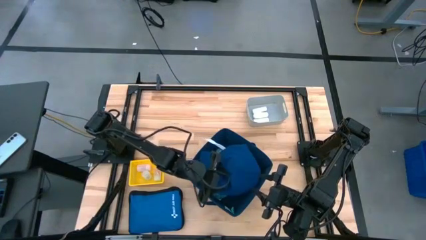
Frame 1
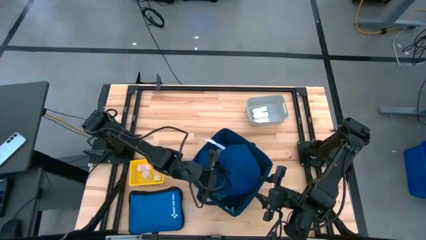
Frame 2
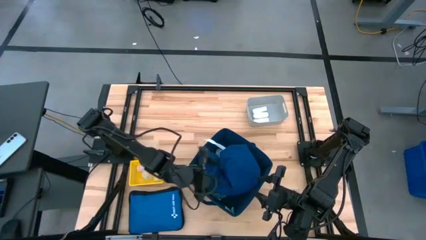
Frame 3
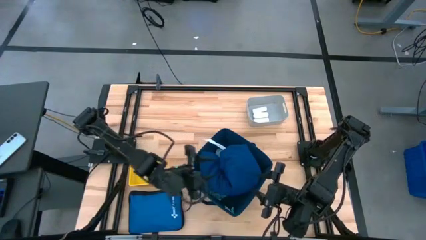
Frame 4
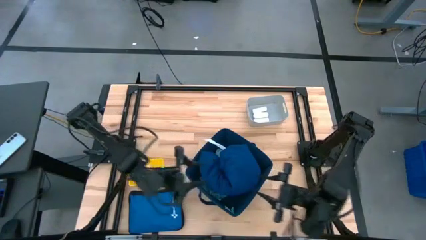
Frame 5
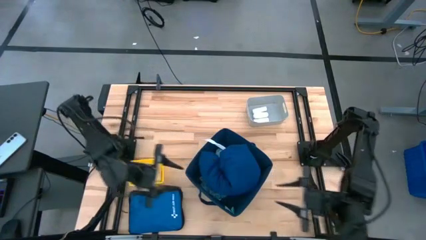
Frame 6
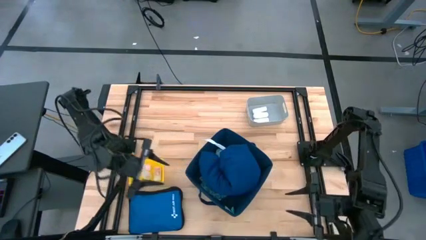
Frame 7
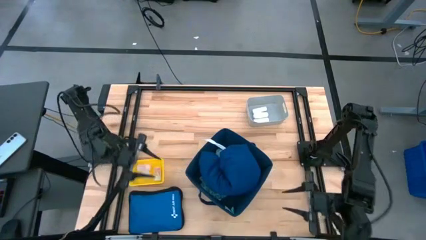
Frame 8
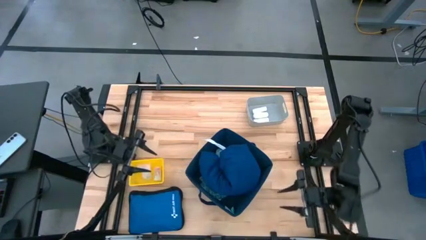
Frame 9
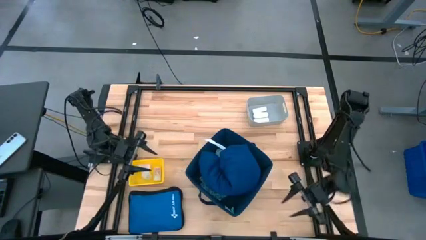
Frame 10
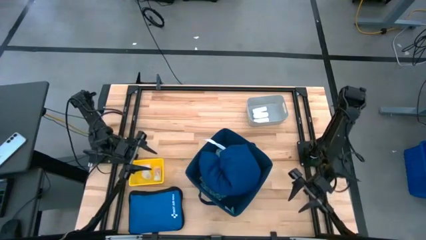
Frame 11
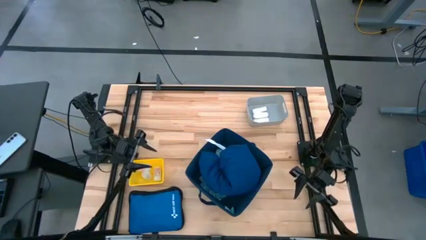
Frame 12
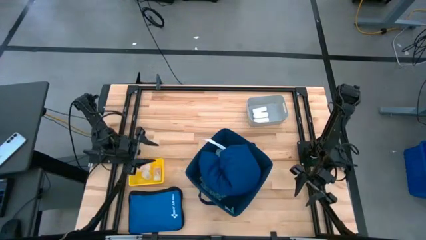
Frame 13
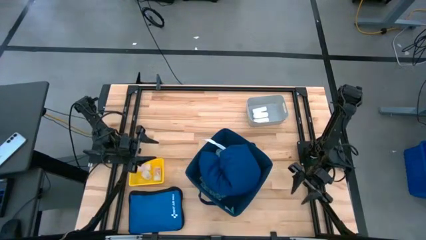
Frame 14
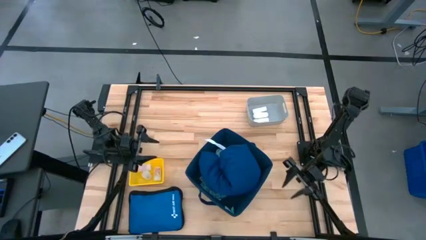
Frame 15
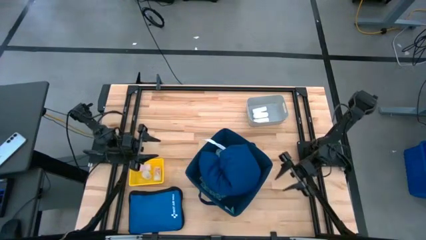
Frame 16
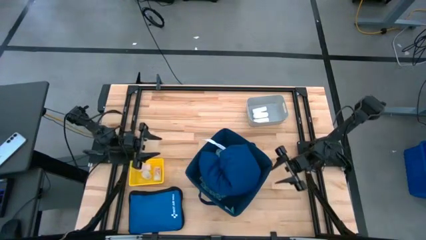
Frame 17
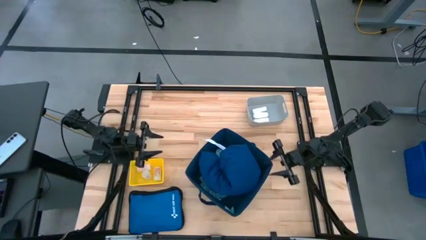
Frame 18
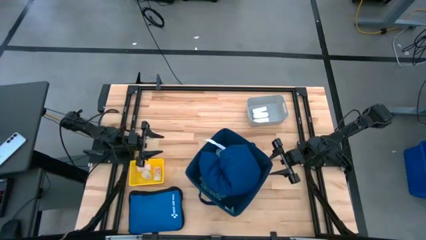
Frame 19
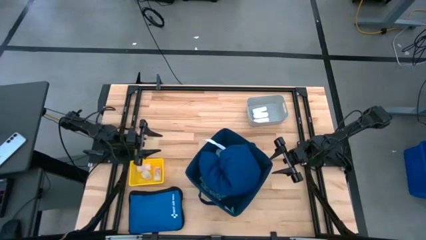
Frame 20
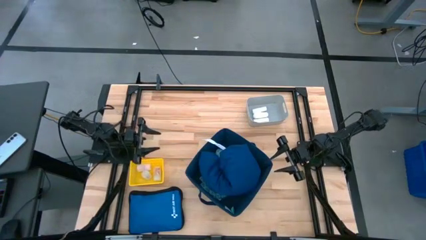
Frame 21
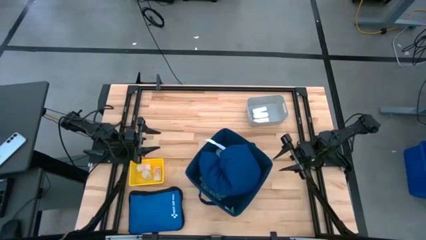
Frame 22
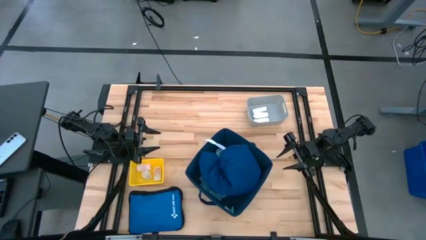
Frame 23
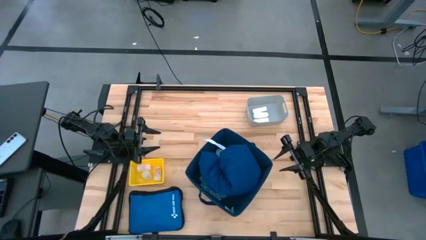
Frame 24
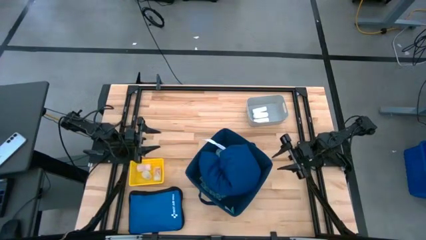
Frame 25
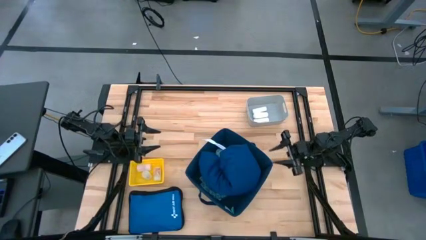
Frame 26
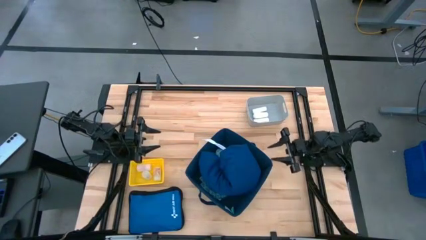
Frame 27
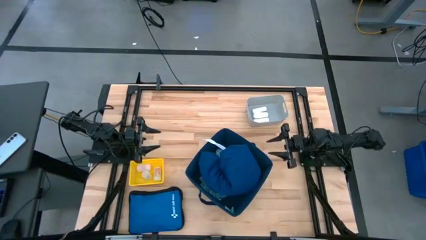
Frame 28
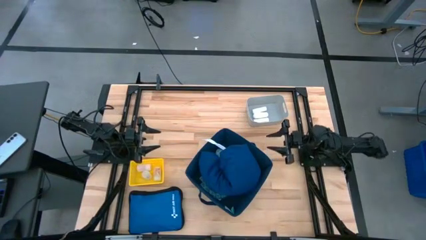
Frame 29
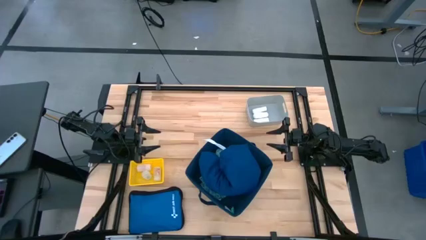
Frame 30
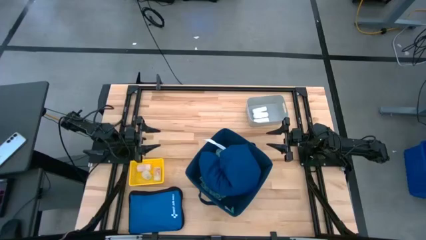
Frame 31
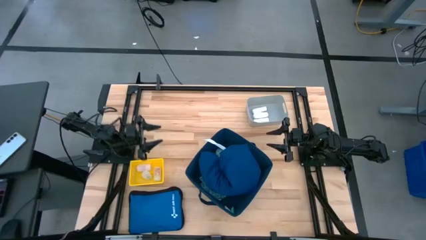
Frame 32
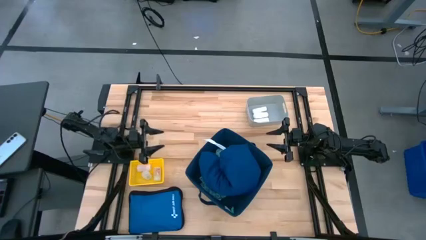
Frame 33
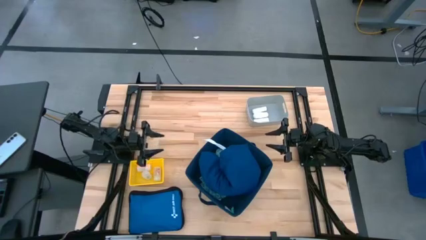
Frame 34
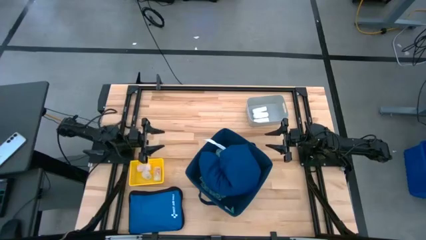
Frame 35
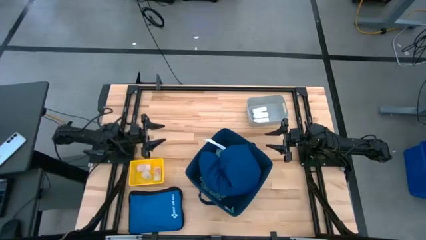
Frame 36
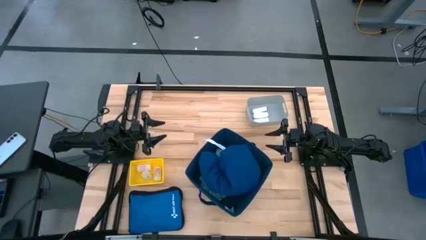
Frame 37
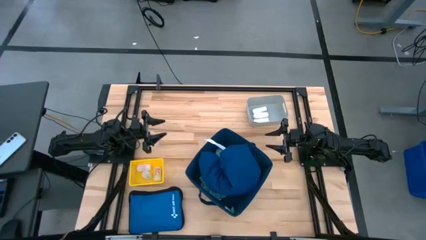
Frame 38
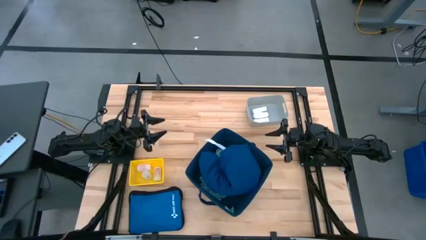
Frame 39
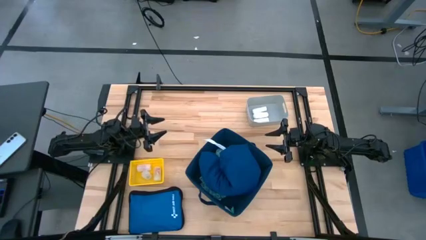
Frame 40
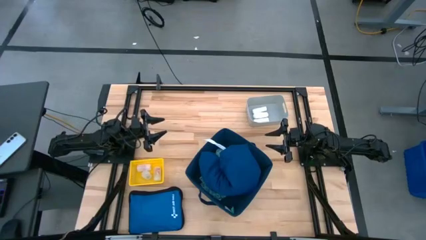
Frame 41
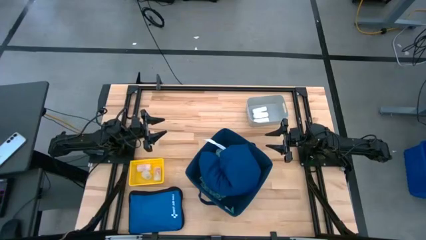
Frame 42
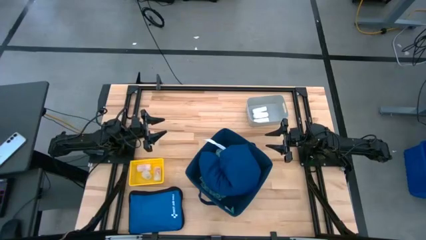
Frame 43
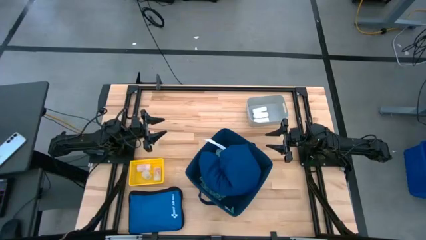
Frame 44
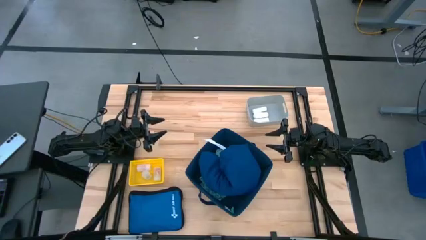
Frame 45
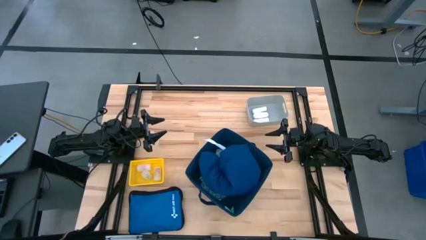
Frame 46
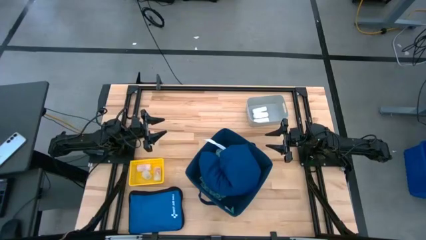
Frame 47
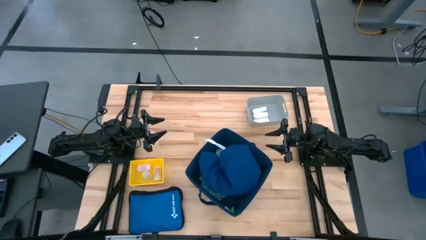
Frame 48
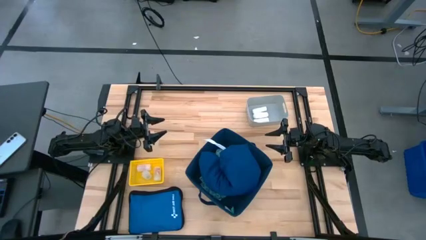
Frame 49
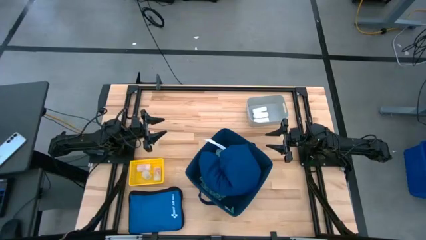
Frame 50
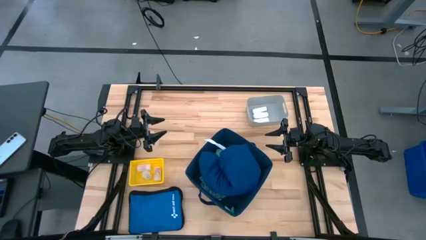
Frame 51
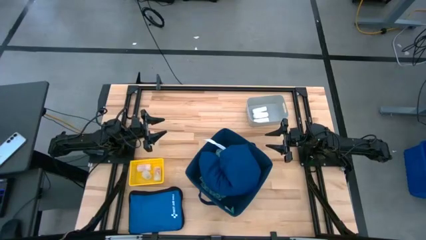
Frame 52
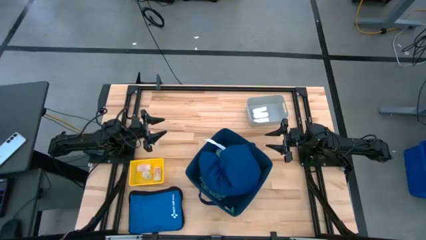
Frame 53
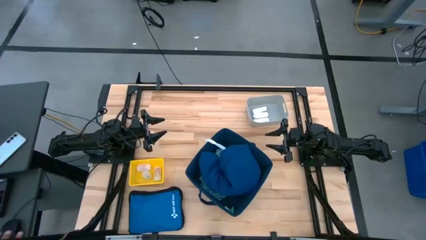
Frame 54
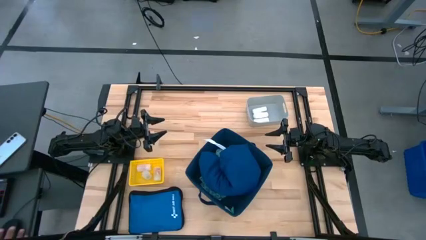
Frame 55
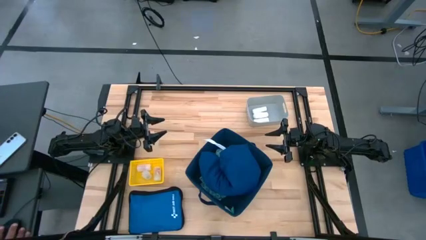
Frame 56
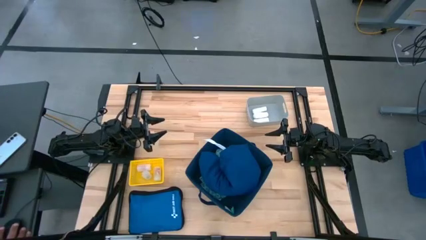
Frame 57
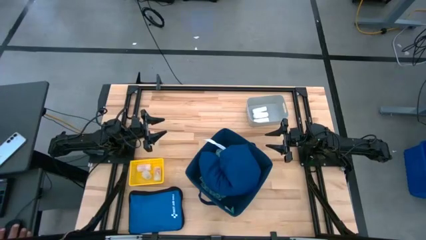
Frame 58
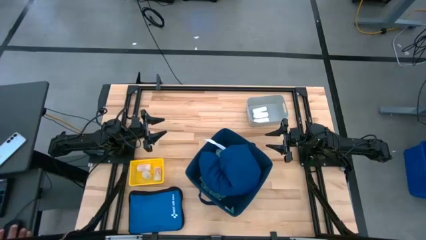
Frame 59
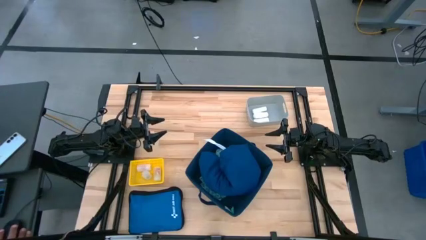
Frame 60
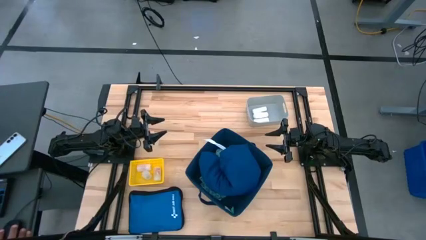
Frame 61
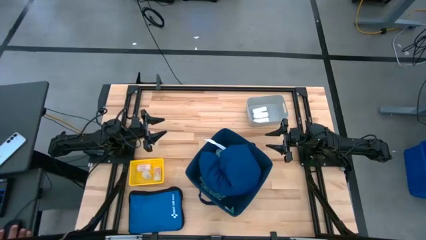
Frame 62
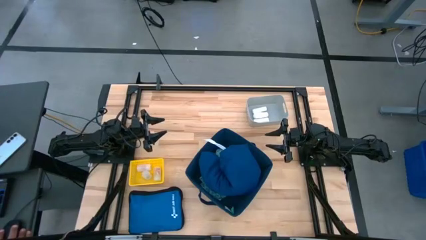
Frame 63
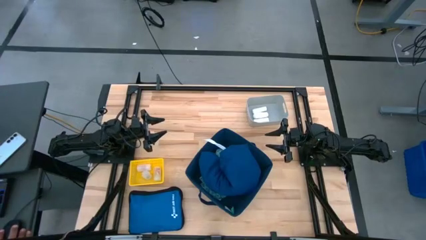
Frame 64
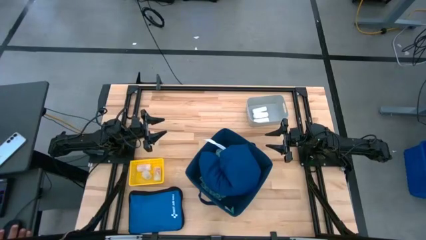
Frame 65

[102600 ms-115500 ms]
Task: Pick & place medical supplies in basket/bin
Return to Home Position

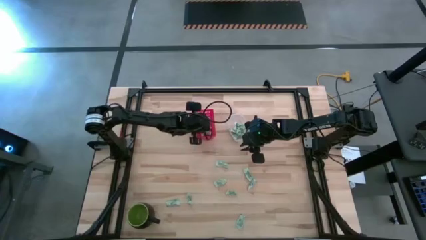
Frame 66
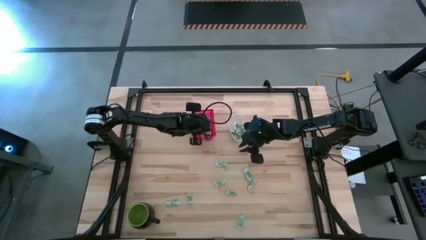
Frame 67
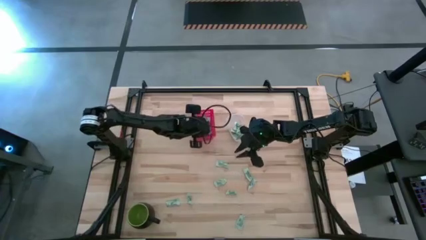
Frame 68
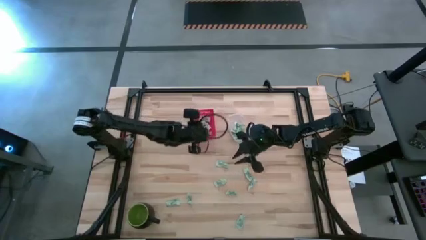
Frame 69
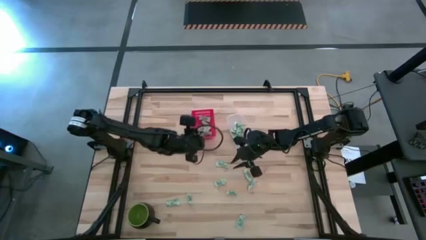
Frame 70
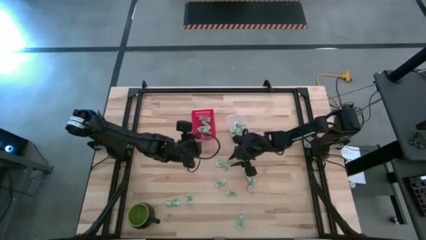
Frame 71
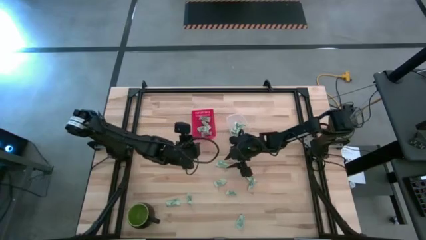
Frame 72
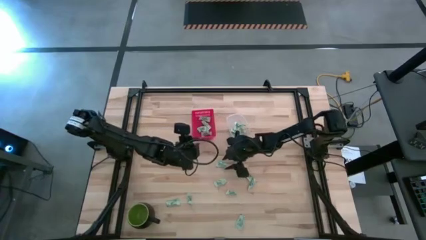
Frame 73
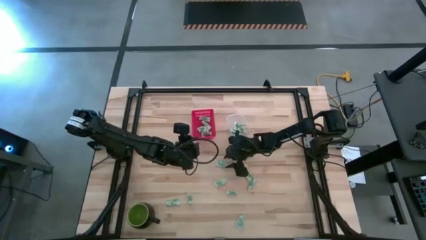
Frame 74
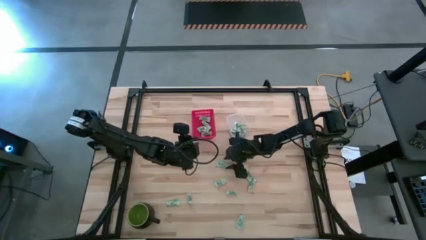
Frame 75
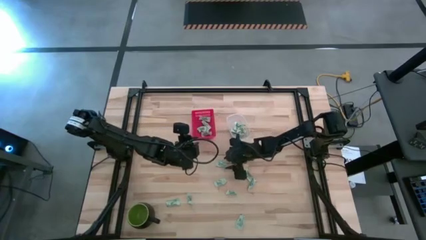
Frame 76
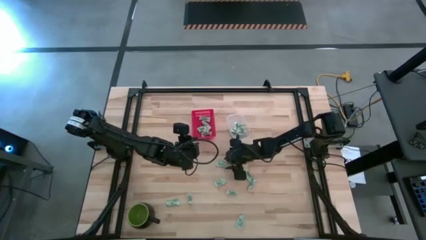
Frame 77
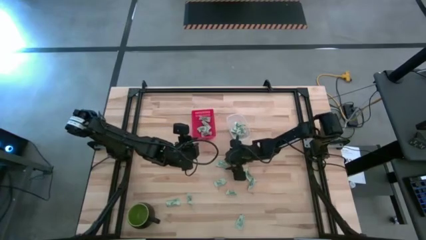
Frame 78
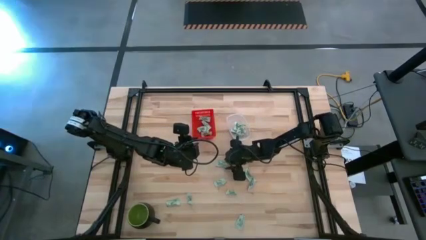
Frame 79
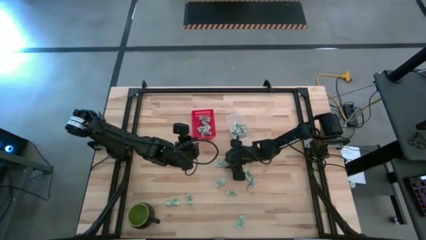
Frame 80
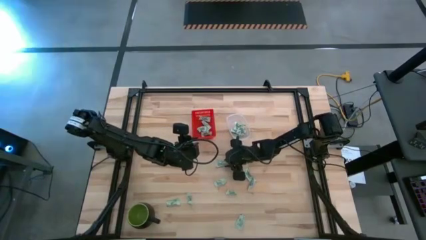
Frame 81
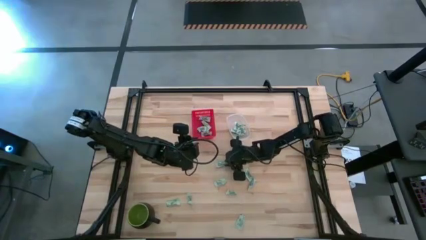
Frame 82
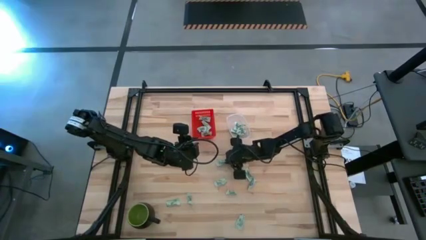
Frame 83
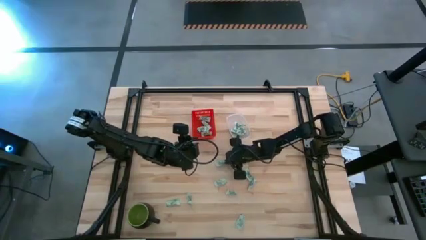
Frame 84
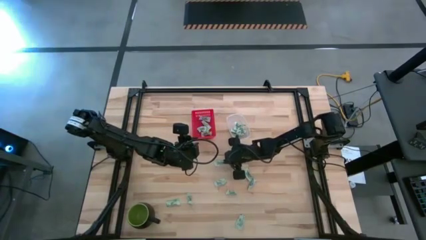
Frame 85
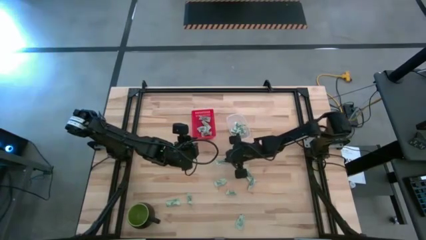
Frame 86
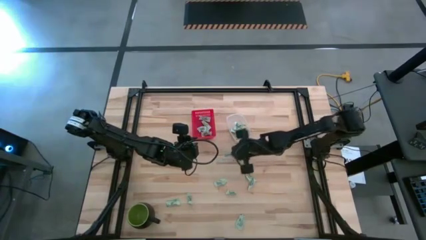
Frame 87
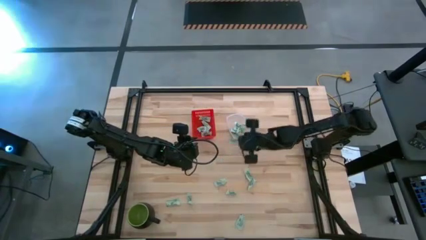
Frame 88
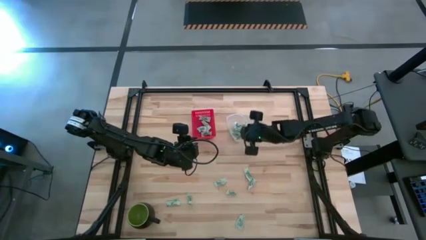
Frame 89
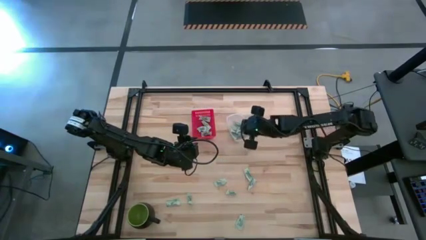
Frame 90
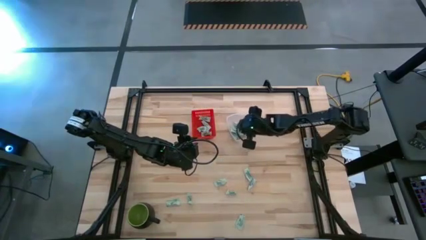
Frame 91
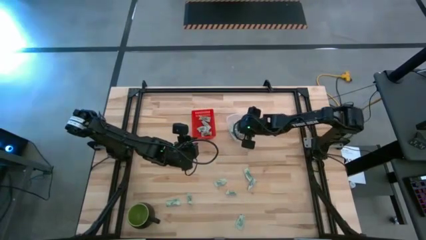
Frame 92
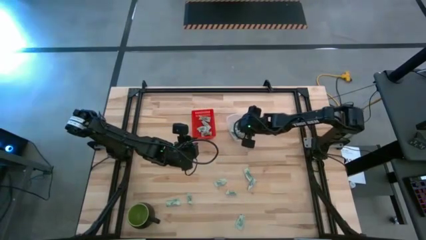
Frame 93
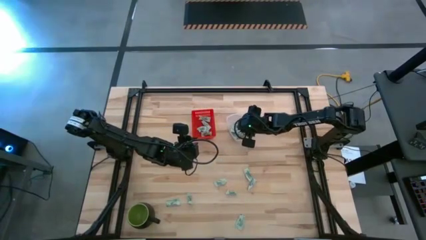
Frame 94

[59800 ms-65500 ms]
Task: Pick and place items into bin
Put the white stevia packet into the transparent bin
